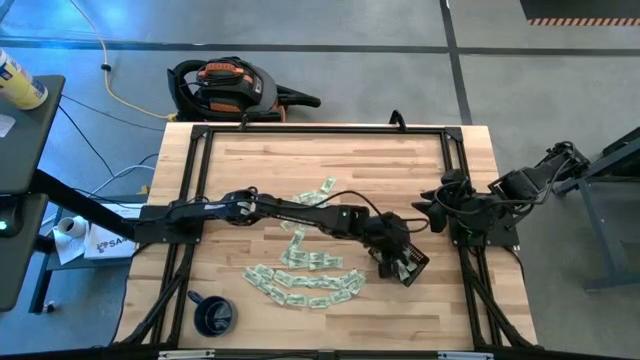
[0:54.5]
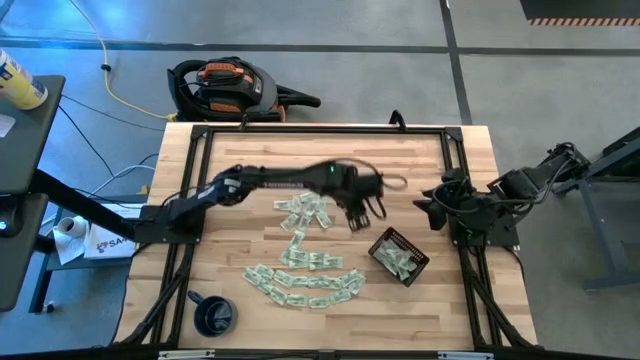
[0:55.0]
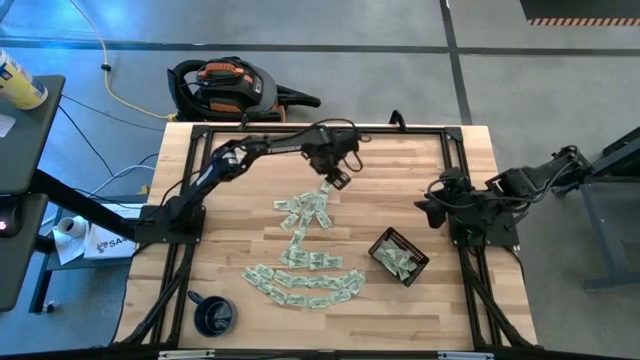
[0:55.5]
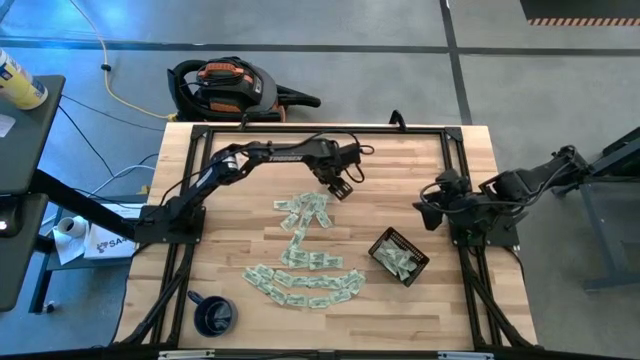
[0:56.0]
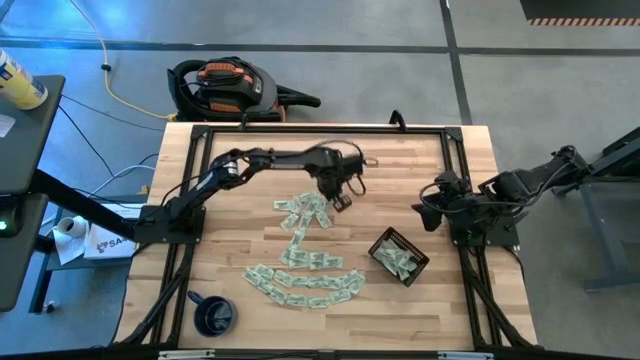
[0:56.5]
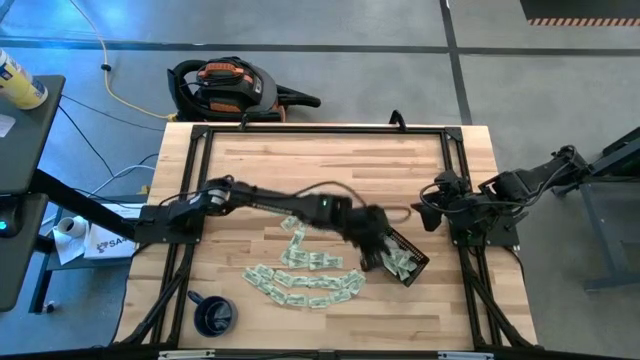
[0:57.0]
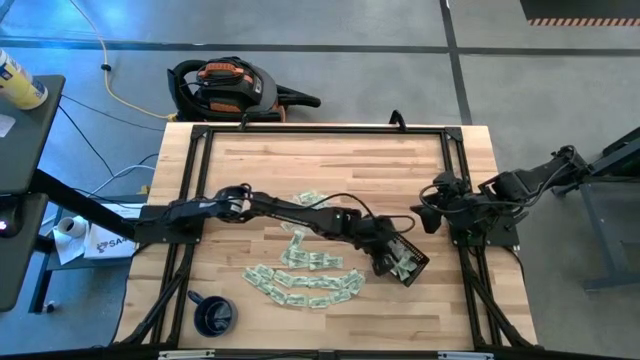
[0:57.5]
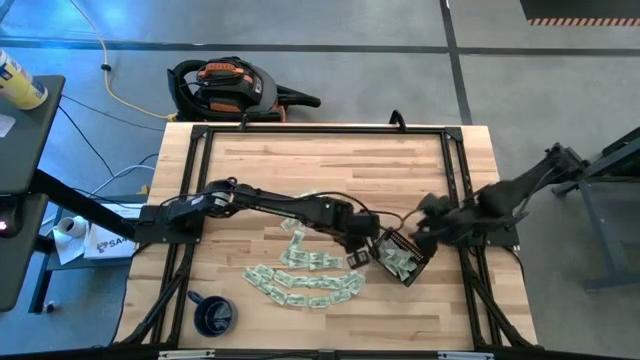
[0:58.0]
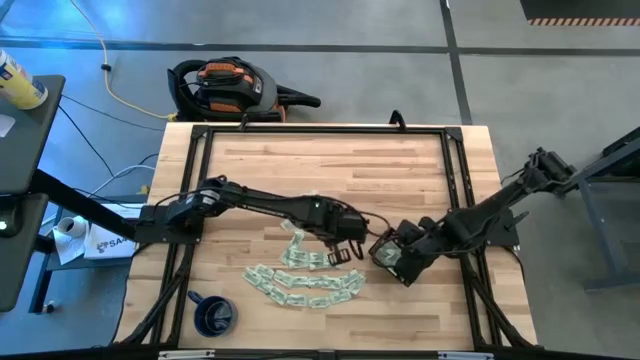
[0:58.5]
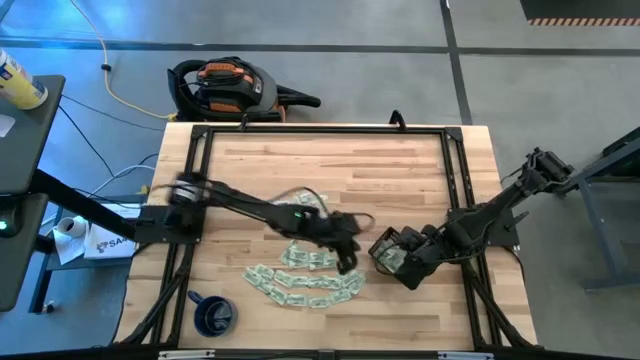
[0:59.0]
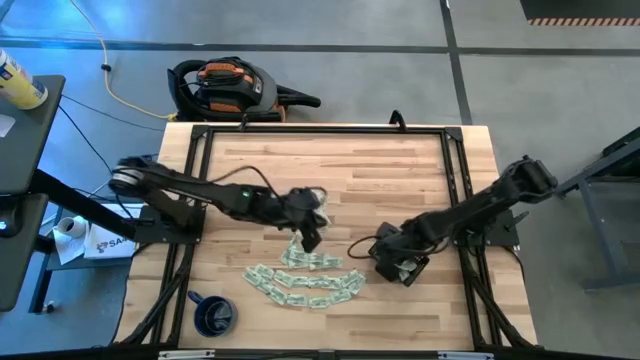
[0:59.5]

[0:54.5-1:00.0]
Task: Pick and place Stevia / Truvia into bins
Put the stevia packet into the black bin

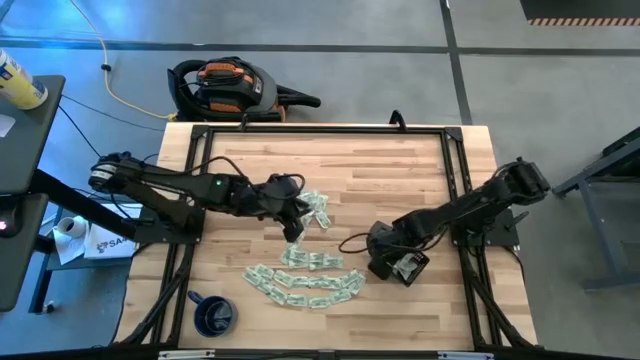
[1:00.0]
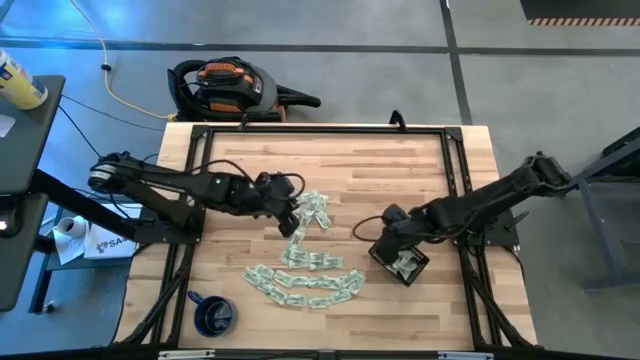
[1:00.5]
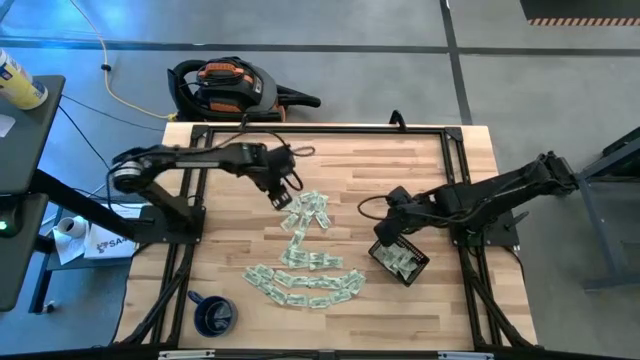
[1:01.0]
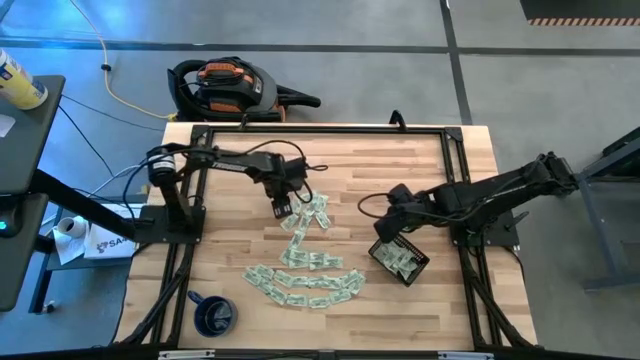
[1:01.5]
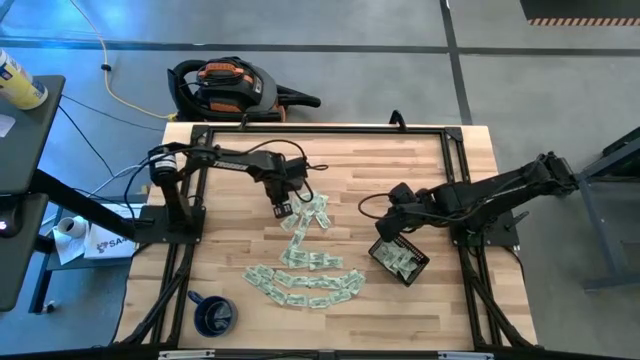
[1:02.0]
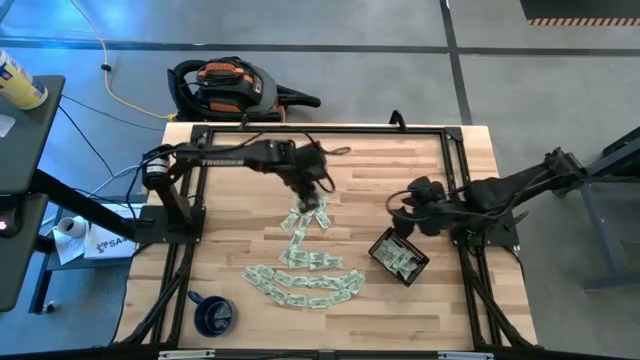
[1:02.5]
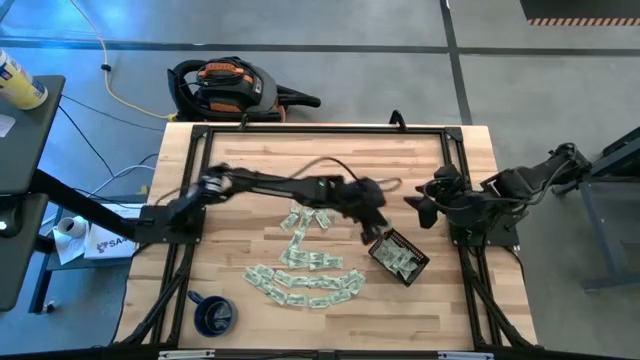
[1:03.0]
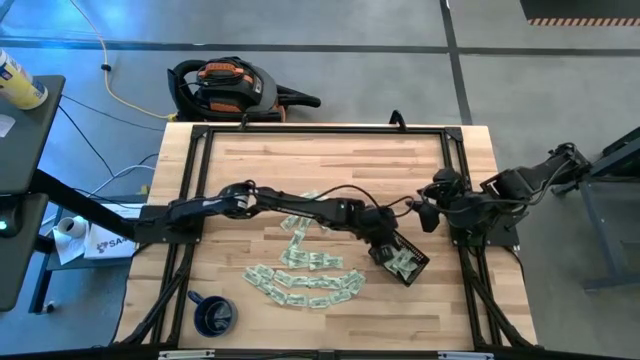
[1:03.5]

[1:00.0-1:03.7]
Put the stevia packet into the black bin

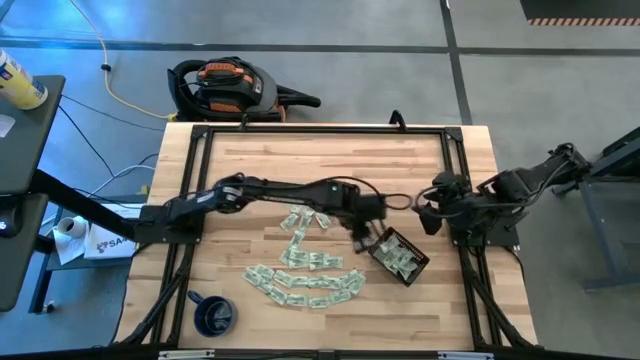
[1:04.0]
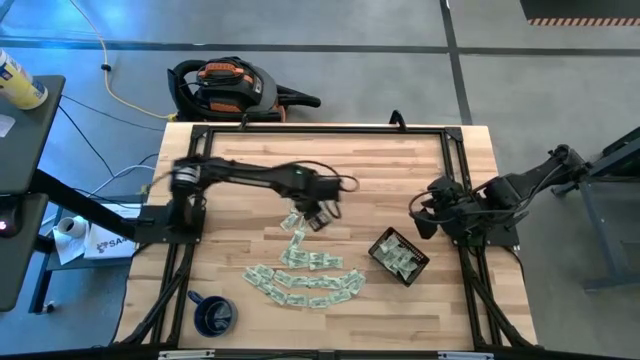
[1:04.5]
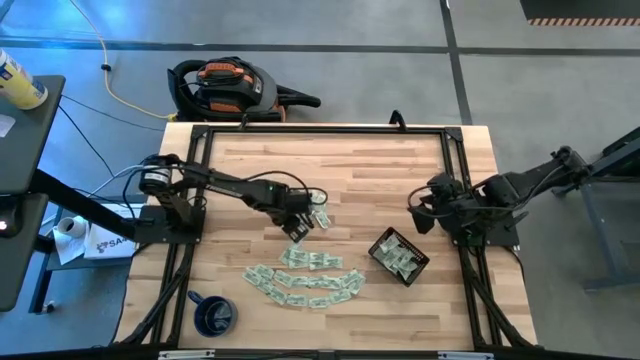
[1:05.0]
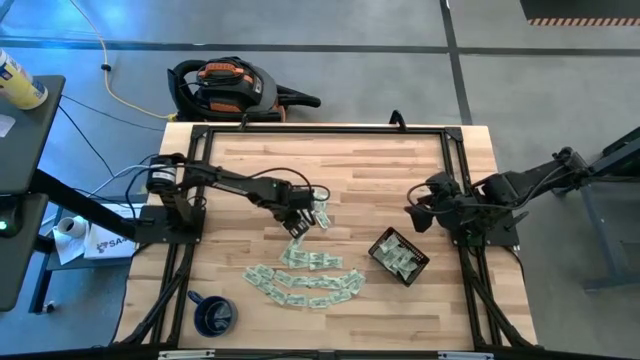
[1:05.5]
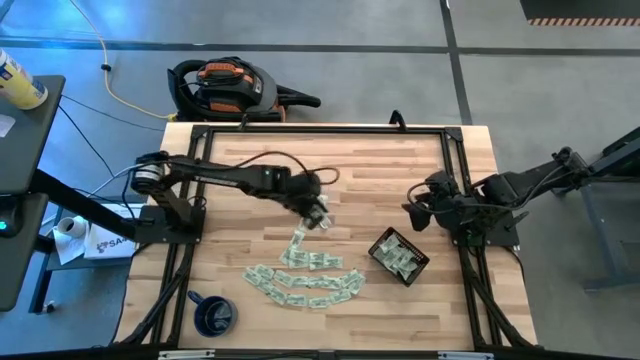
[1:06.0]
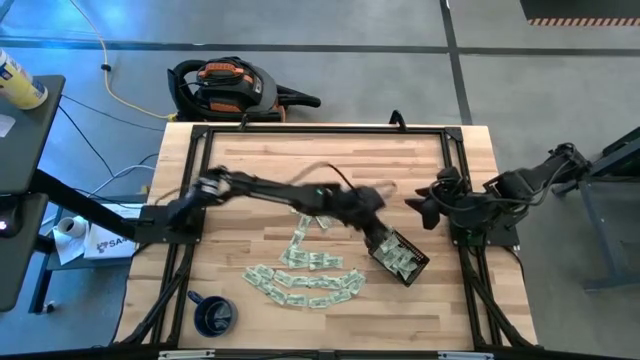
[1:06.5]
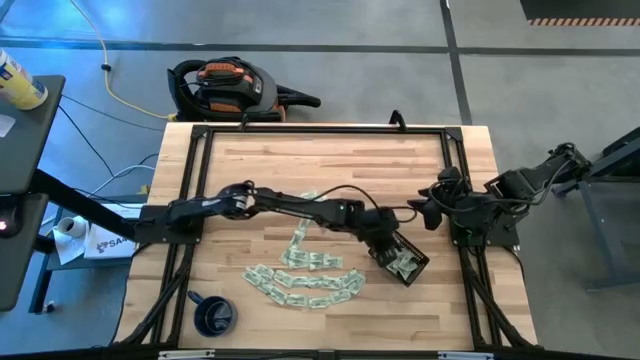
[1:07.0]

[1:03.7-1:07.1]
Put the stevia packet into the black bin

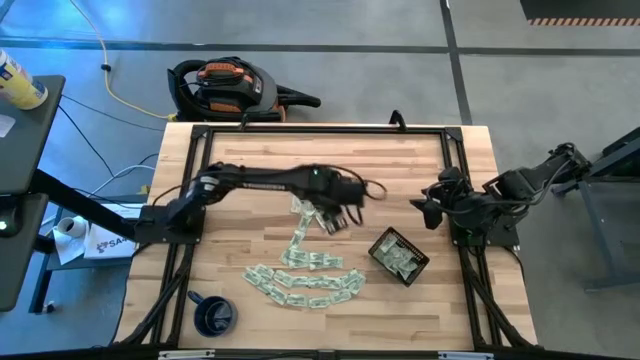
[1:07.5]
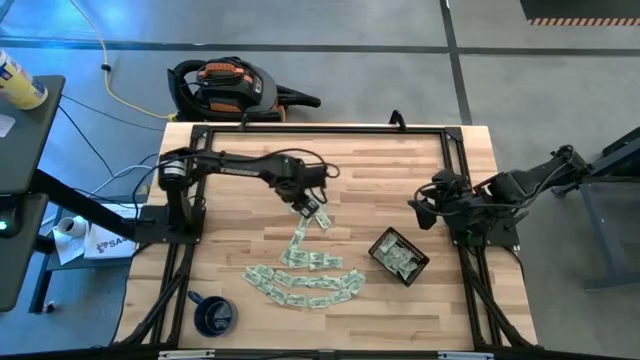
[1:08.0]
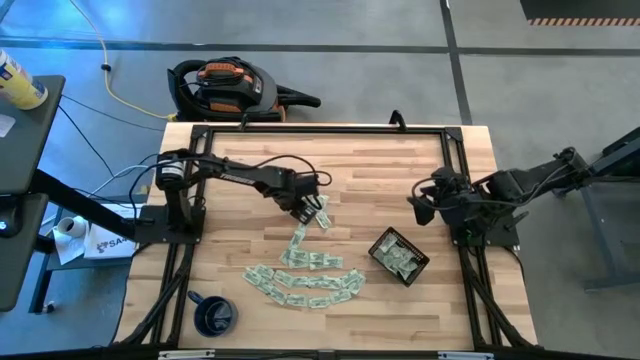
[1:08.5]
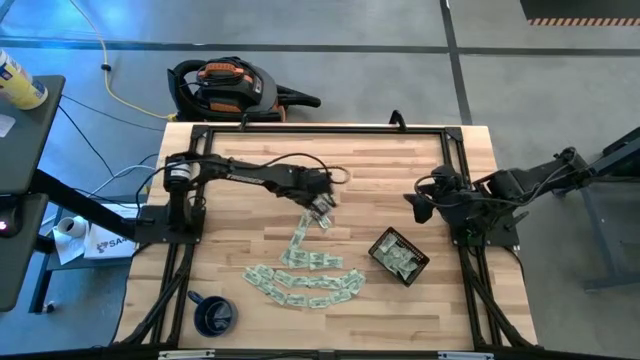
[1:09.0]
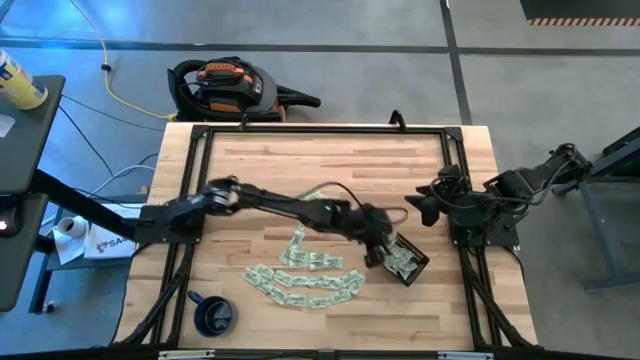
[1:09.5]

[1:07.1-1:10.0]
Put the stevia packet into the black bin

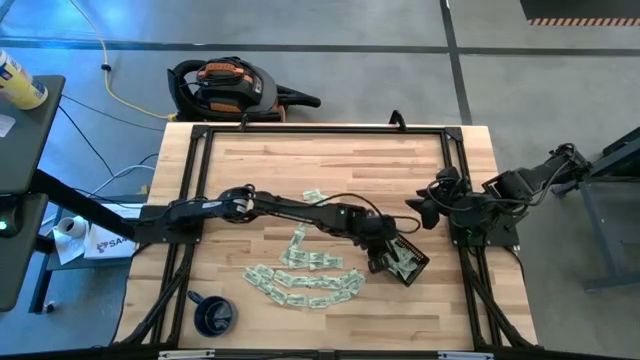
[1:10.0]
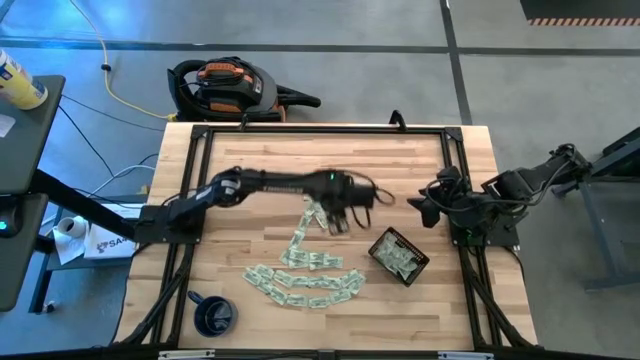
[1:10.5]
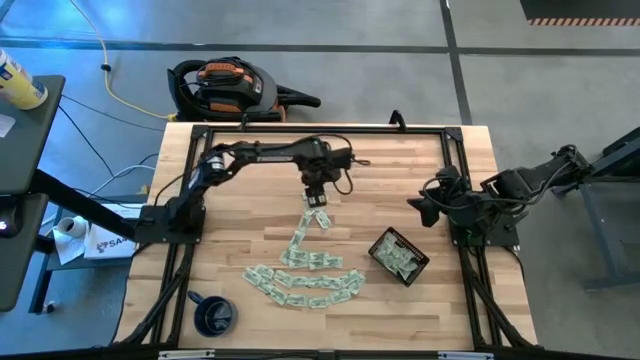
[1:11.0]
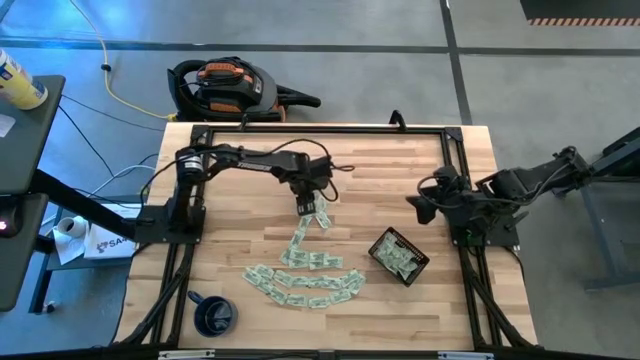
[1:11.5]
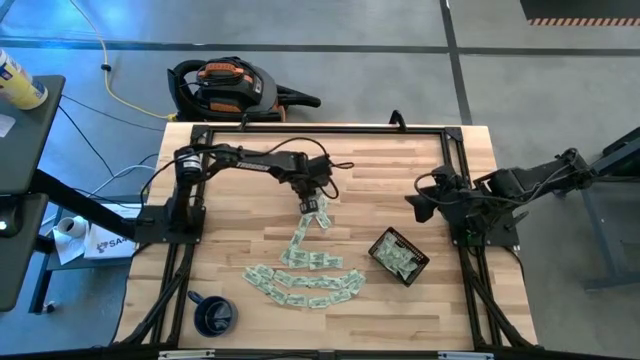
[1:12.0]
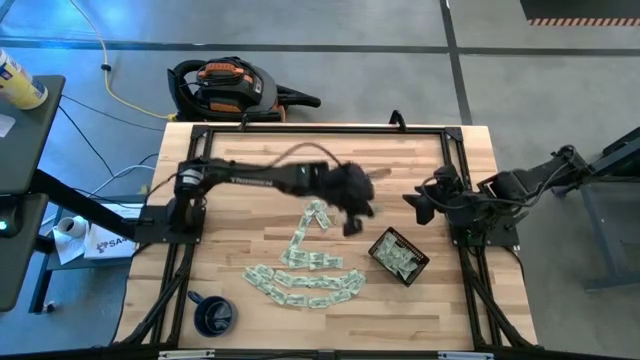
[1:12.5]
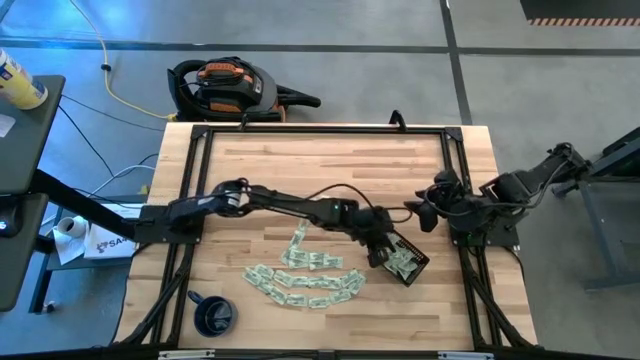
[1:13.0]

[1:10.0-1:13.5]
Put the stevia packet into the black bin

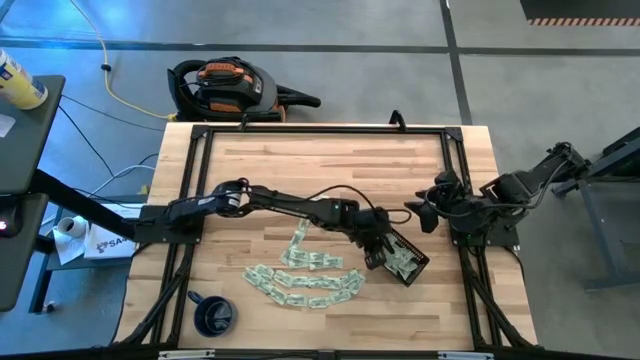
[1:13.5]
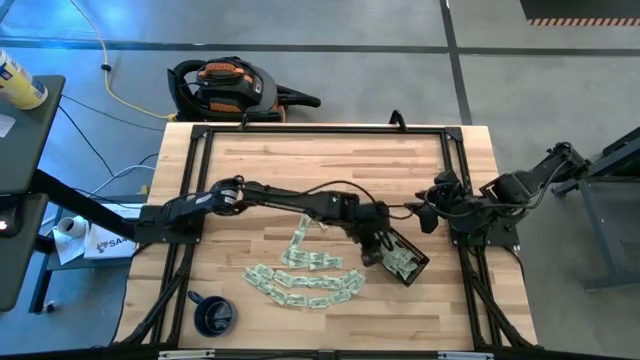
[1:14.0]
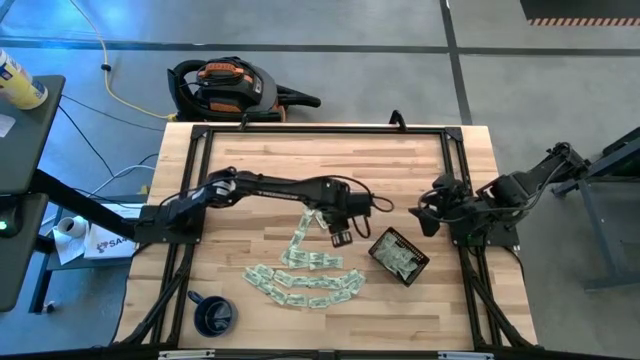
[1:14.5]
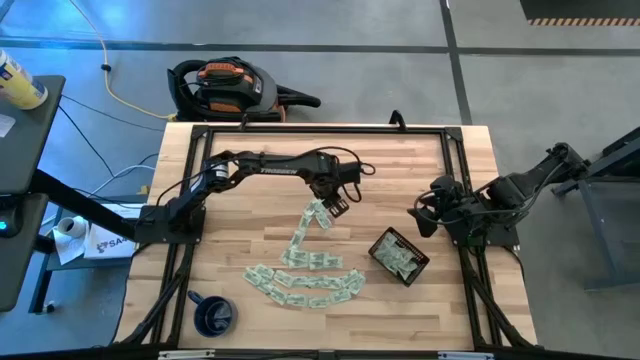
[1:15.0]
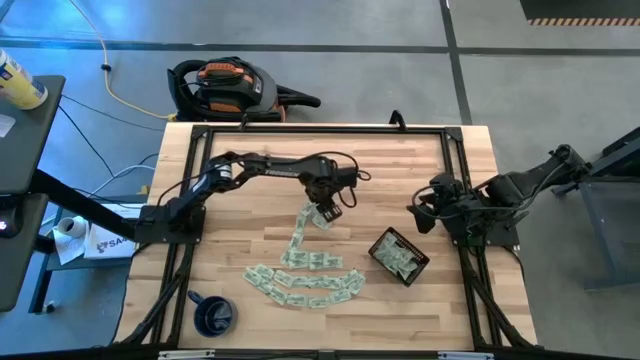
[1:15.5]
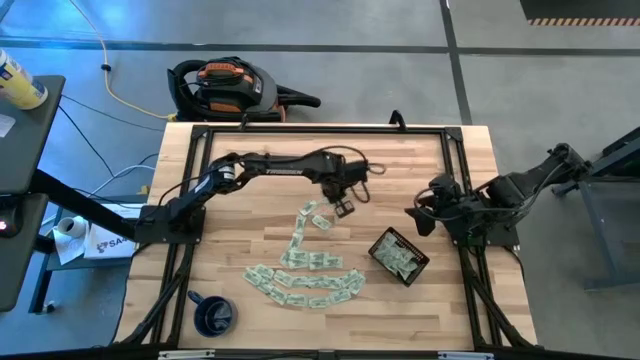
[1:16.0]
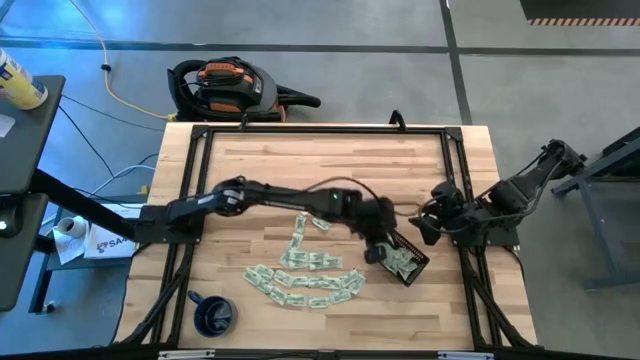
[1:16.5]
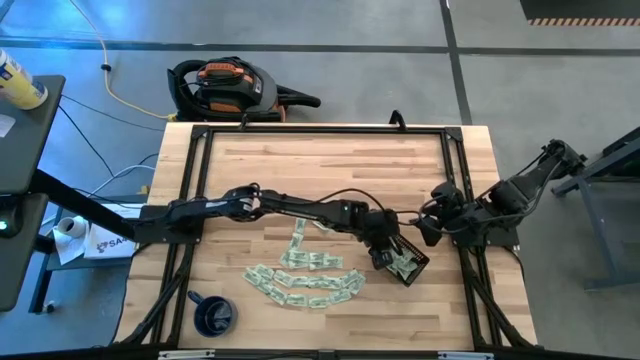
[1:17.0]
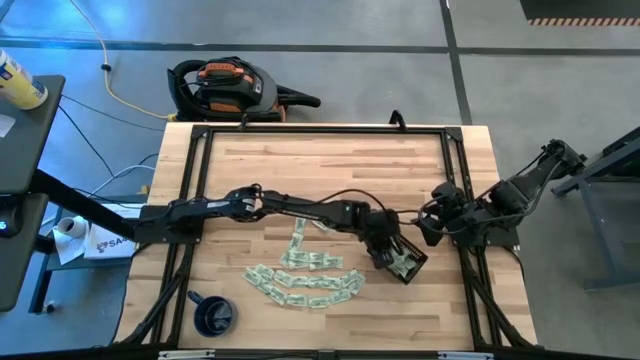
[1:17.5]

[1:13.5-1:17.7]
Put the stevia packet into the black bin
